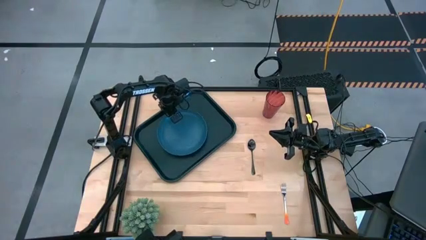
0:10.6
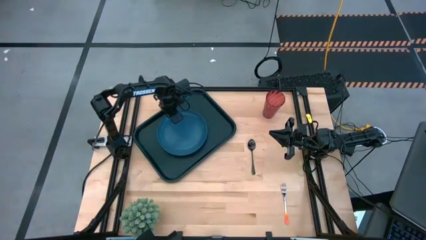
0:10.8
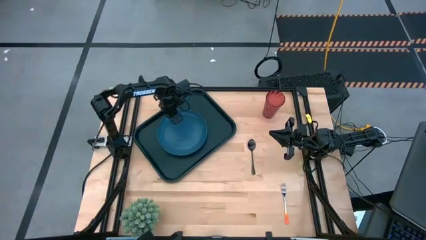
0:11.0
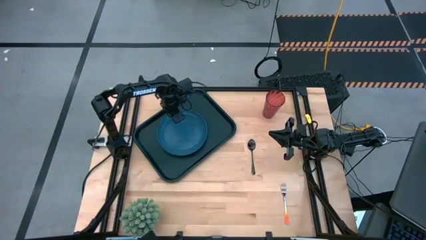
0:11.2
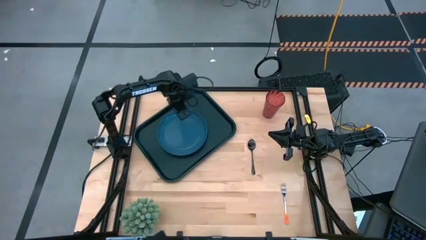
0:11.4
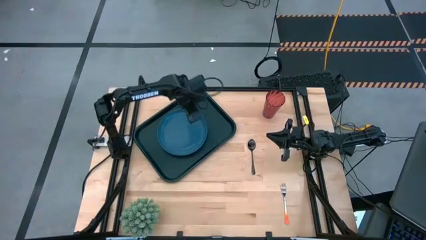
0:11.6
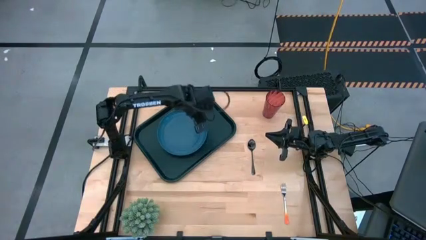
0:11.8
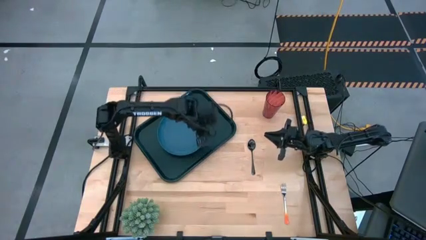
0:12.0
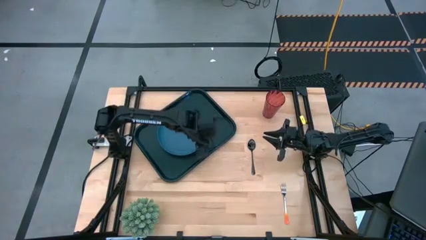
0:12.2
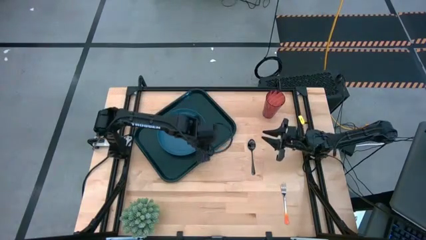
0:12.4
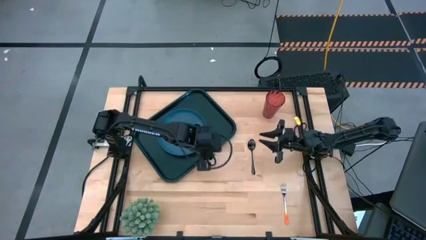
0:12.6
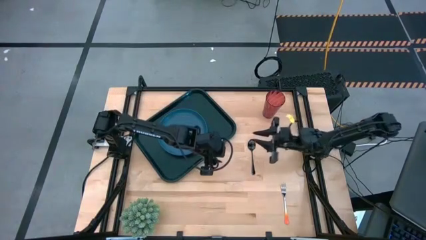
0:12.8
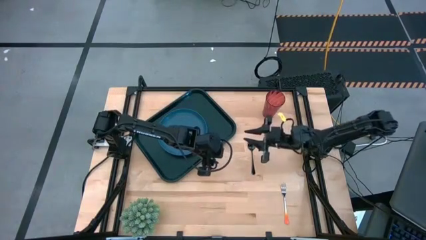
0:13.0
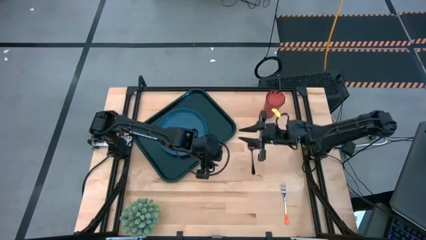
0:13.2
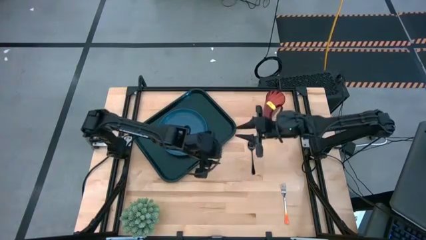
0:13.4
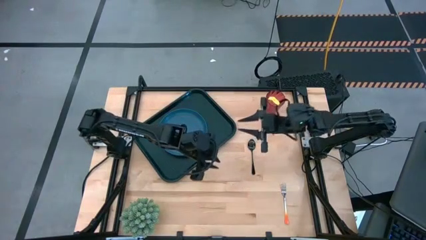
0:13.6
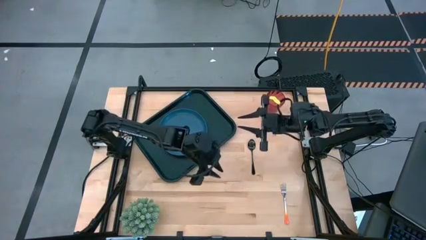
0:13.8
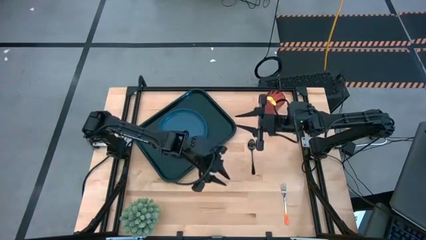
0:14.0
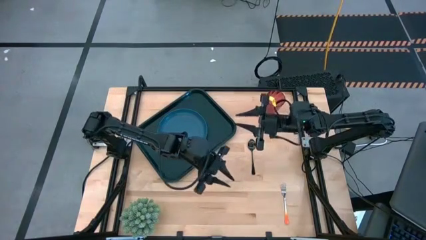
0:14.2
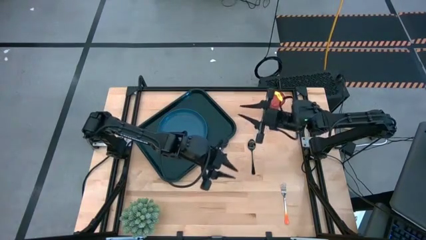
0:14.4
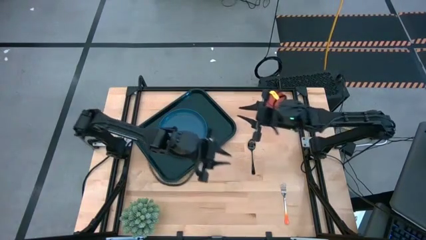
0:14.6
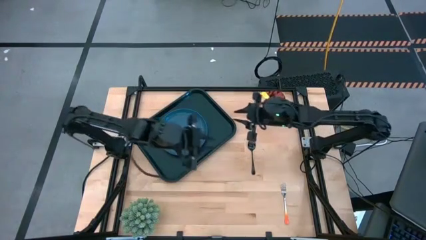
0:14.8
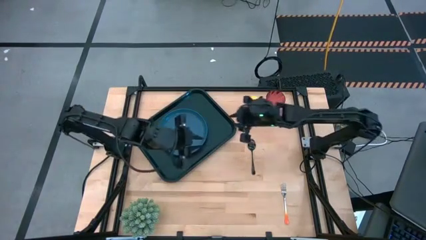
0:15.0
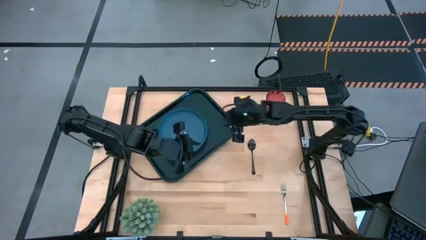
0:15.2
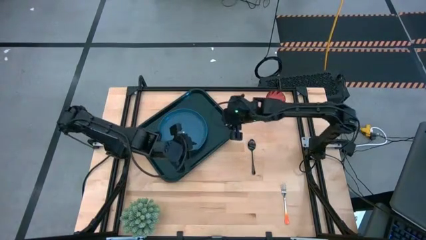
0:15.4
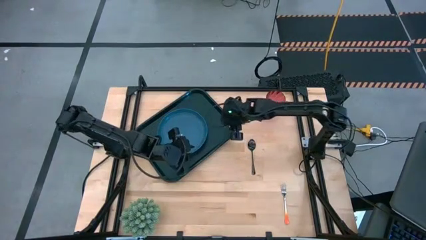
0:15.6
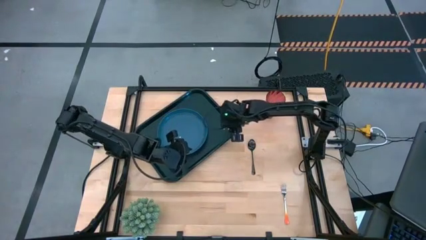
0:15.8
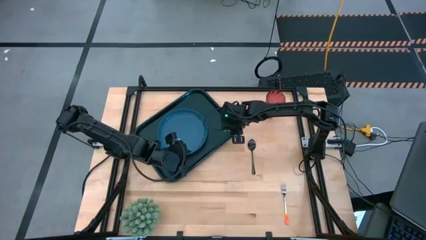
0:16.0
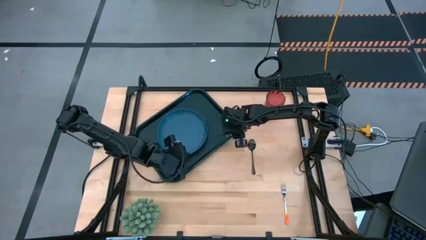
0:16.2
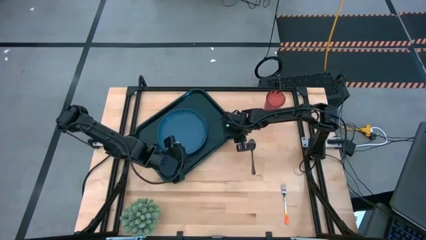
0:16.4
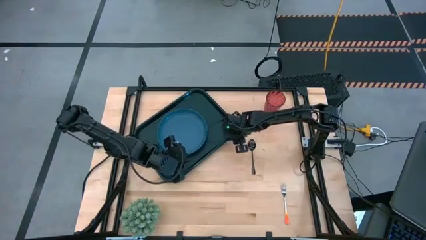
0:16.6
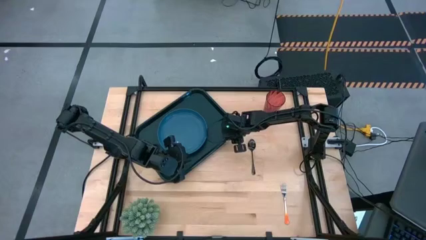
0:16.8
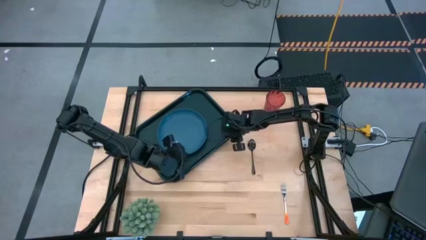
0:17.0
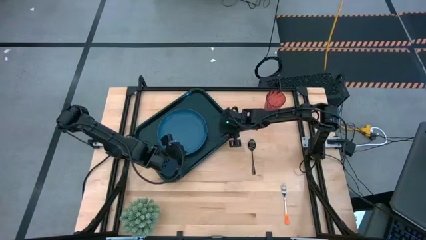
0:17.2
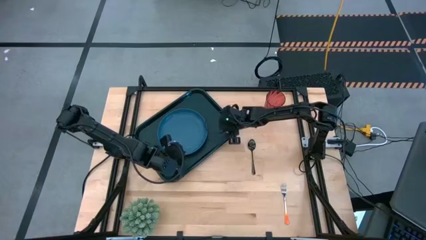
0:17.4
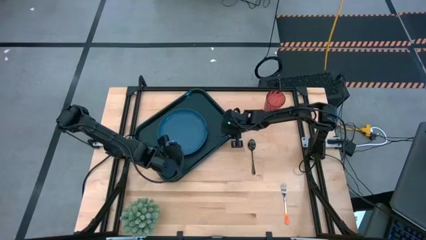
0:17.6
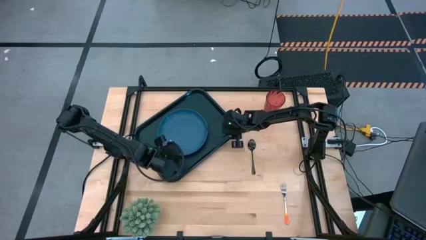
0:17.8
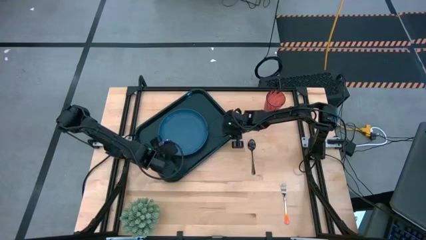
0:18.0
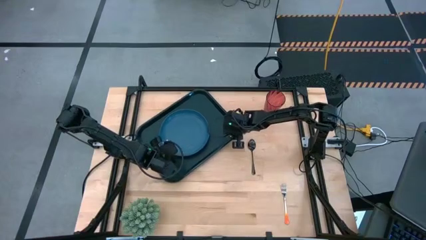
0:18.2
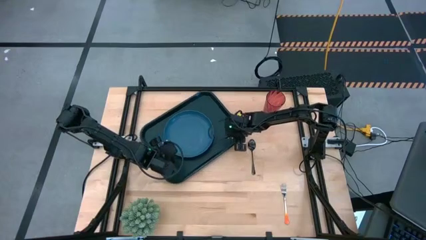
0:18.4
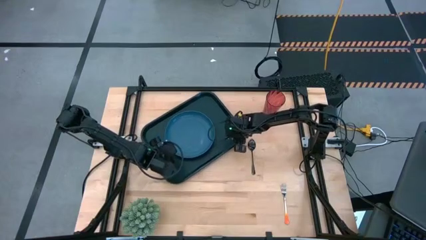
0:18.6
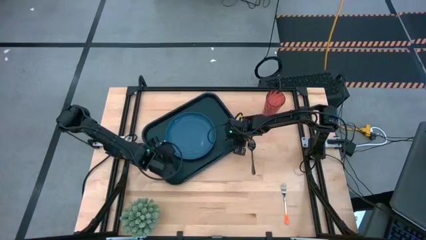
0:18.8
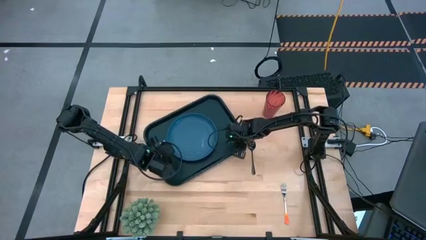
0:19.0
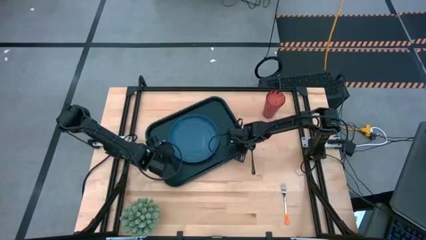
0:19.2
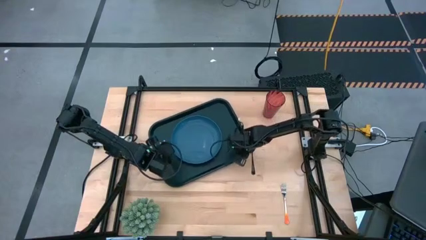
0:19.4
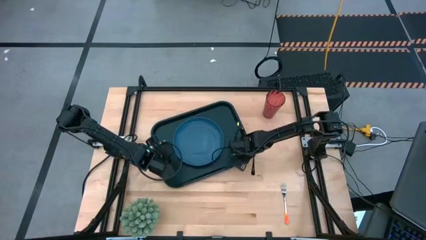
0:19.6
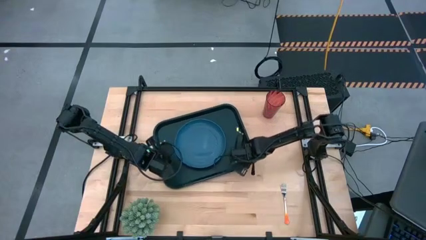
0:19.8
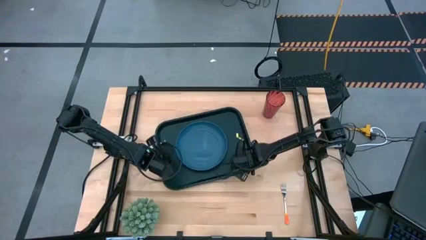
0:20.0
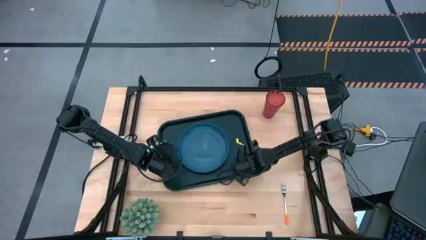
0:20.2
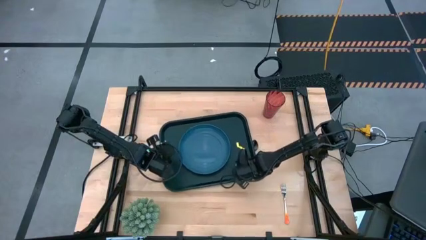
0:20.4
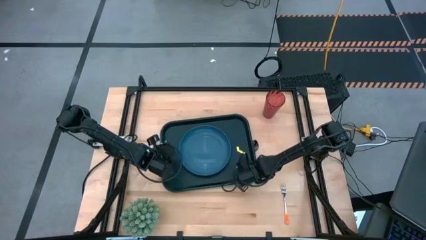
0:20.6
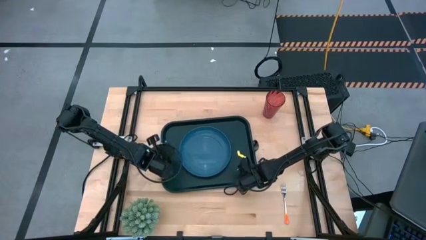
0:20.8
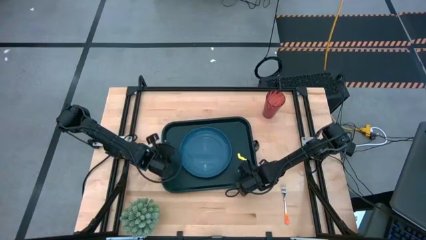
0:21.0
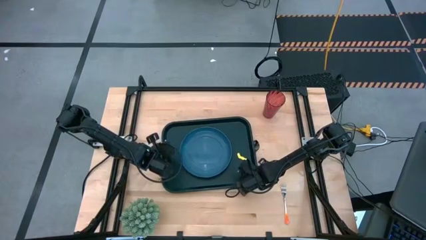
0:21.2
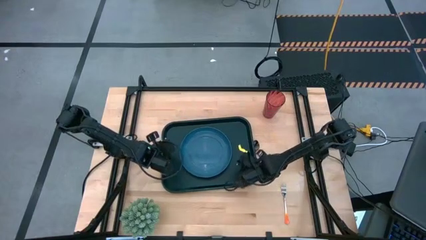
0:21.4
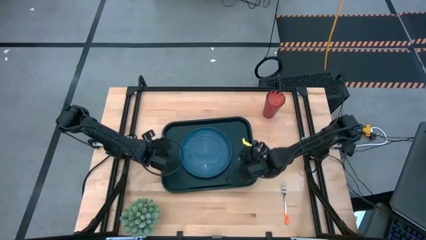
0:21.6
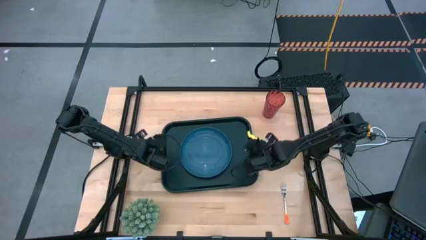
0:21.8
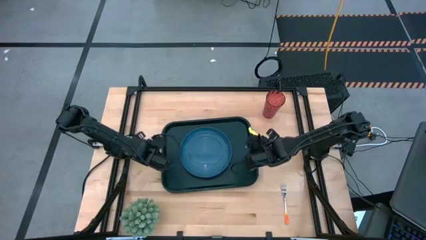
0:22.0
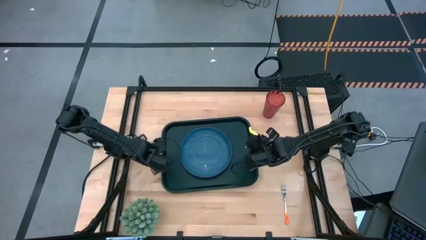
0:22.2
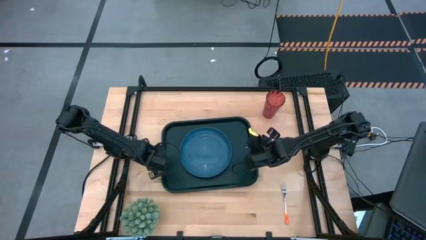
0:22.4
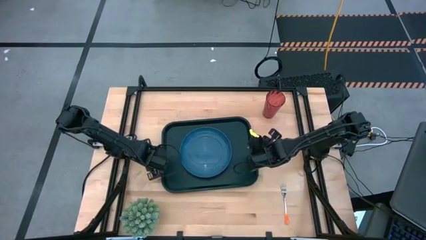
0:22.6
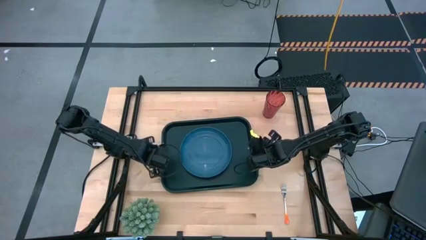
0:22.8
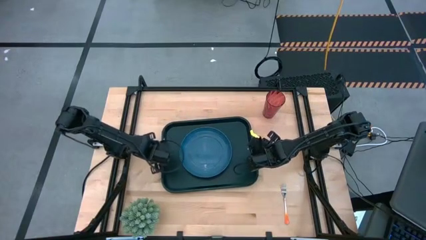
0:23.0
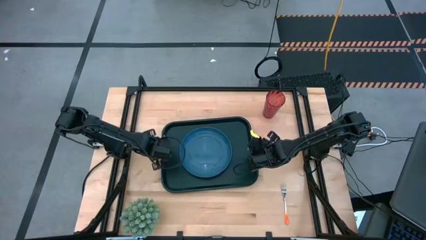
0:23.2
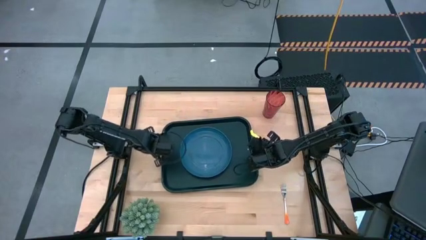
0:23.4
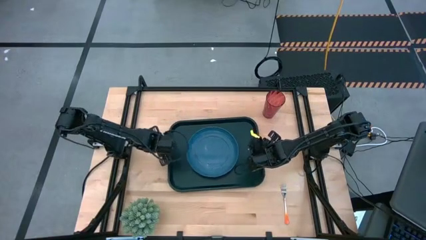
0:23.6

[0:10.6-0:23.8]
Task: Pick and place plate/cup/fork/spoon on tray
Adjust the black tray

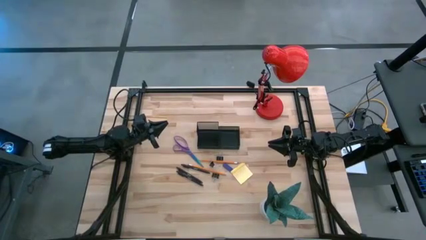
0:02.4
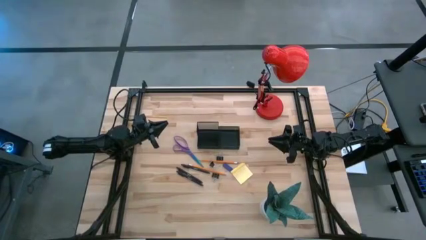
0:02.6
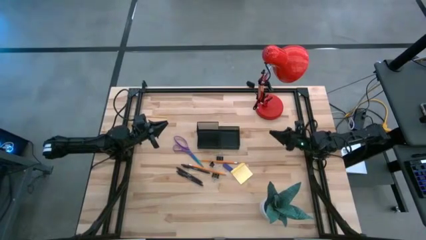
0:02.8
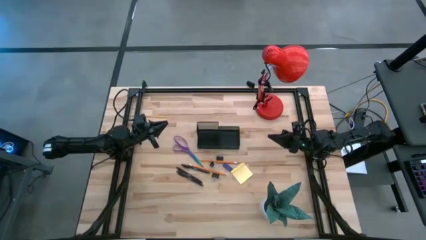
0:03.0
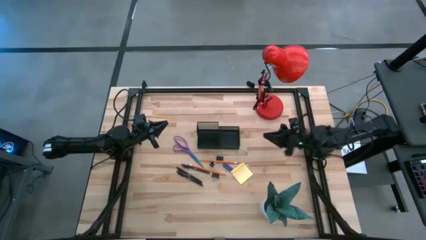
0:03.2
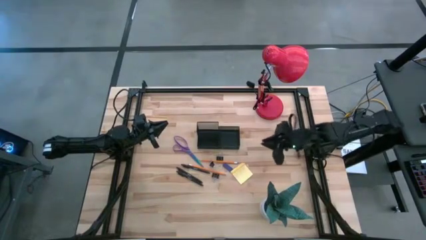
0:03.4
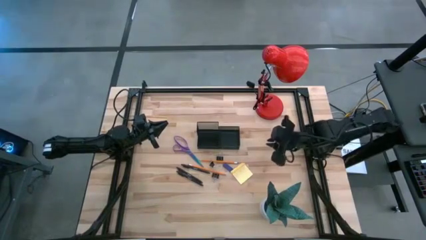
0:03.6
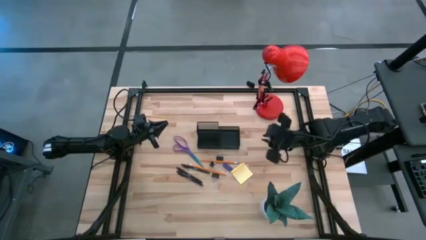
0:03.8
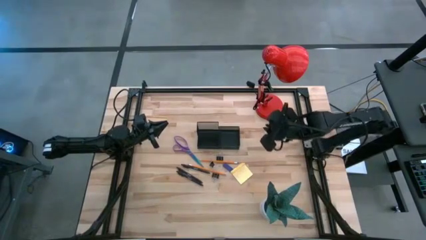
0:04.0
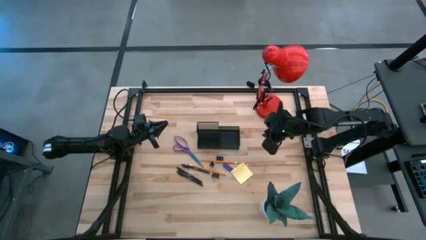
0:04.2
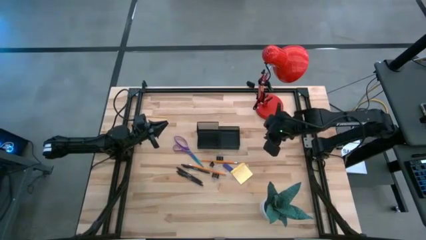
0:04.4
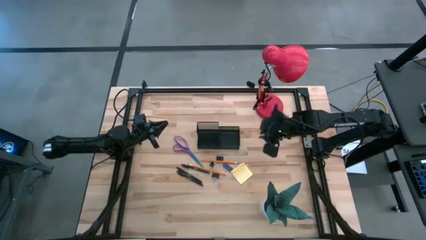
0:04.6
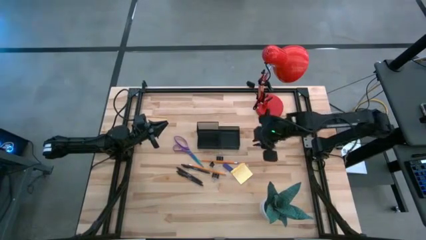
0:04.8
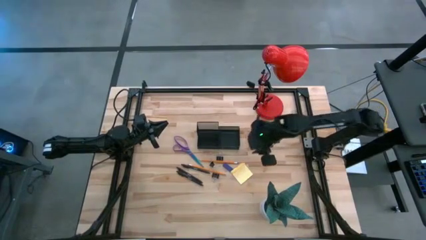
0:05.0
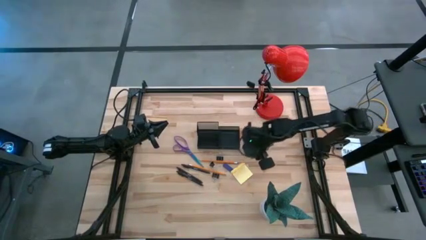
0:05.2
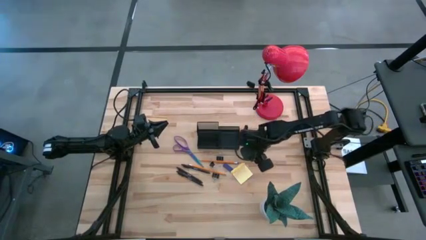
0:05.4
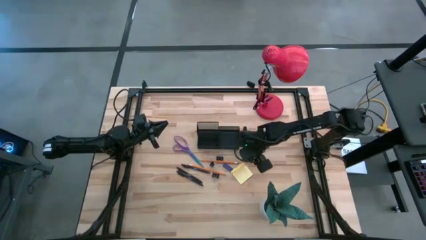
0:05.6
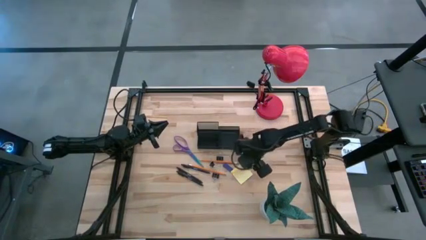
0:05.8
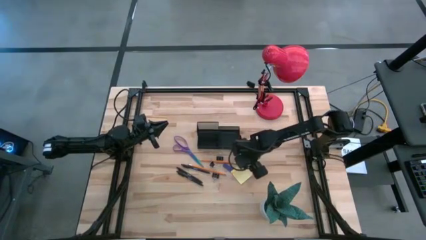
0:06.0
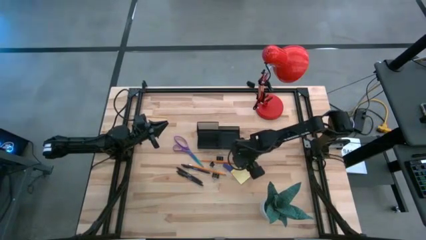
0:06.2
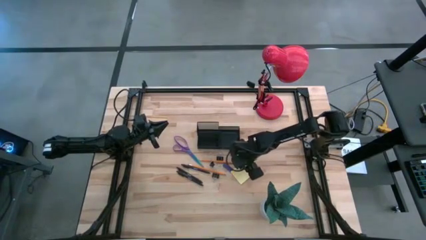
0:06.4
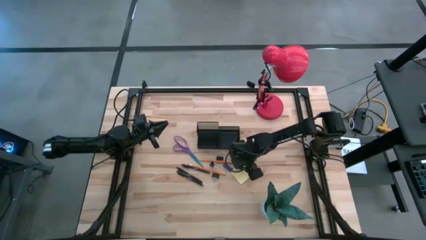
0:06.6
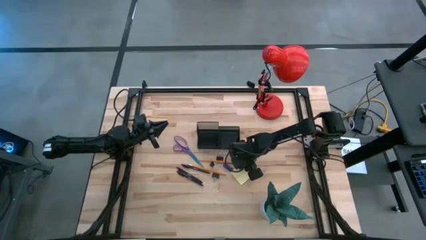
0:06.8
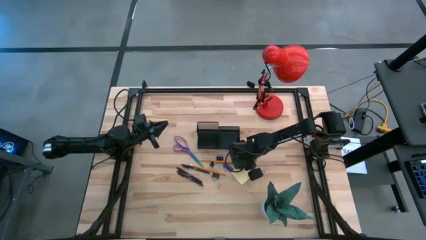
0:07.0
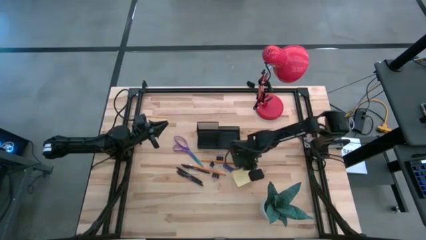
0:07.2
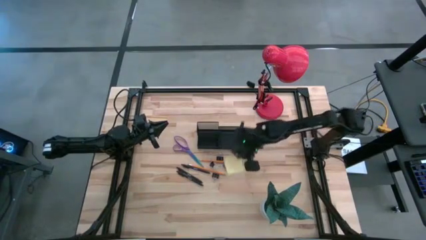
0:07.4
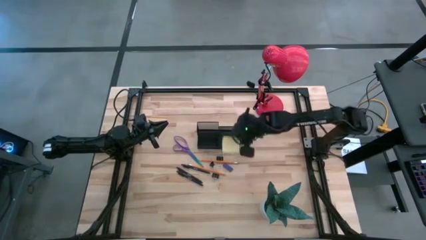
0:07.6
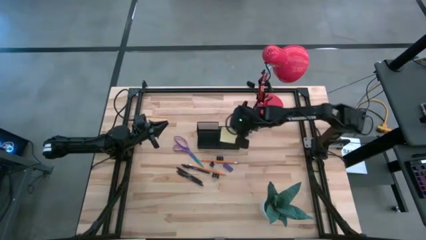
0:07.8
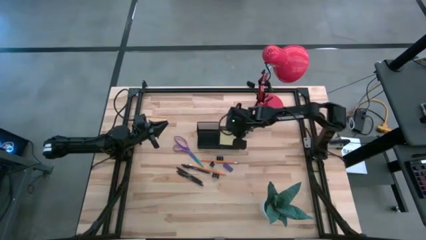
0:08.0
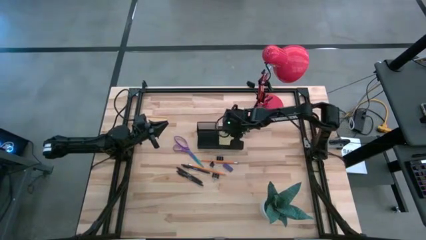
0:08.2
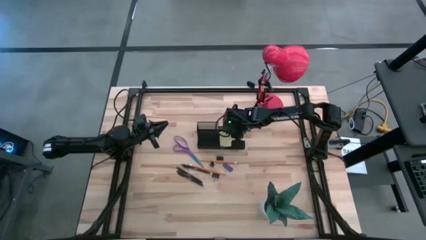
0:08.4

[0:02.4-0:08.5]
Task: Pick and place office supplies into organizer
Put the yellow sticky note pad into the black desk organizer
